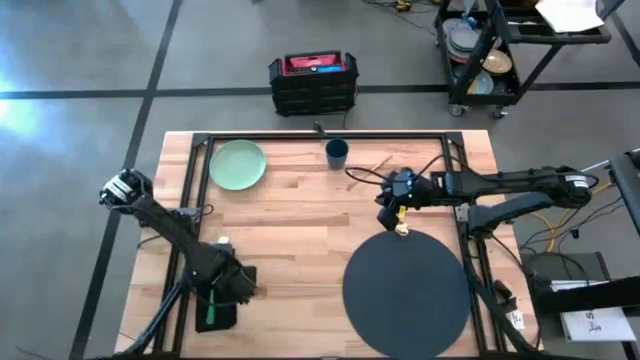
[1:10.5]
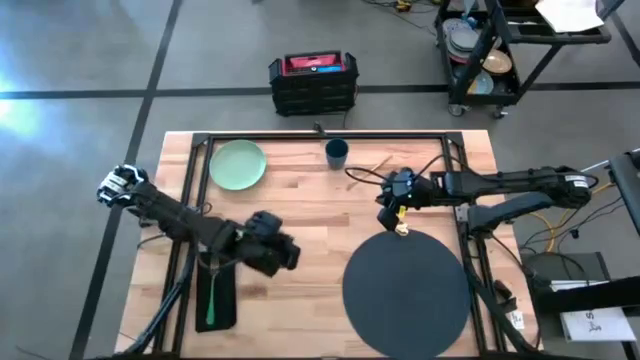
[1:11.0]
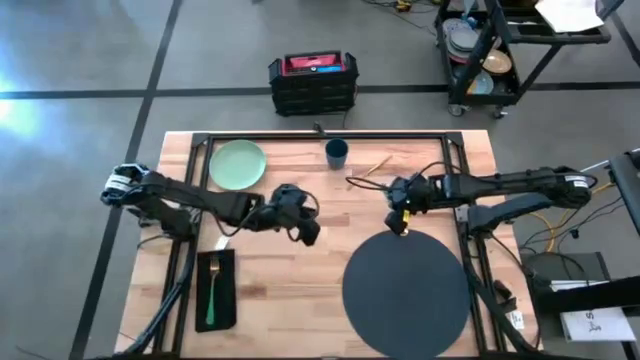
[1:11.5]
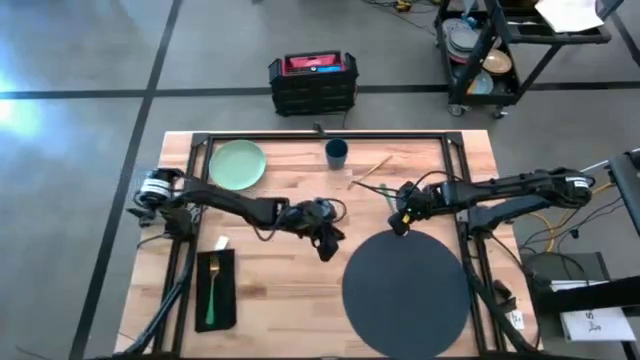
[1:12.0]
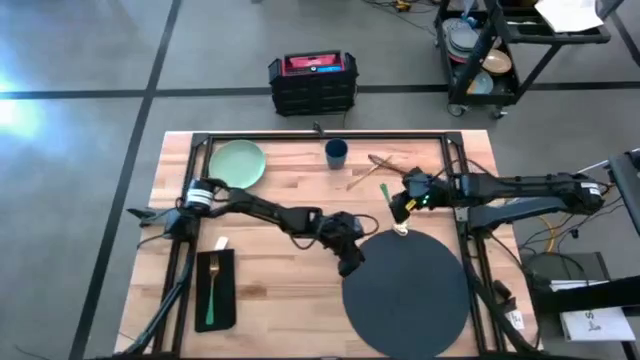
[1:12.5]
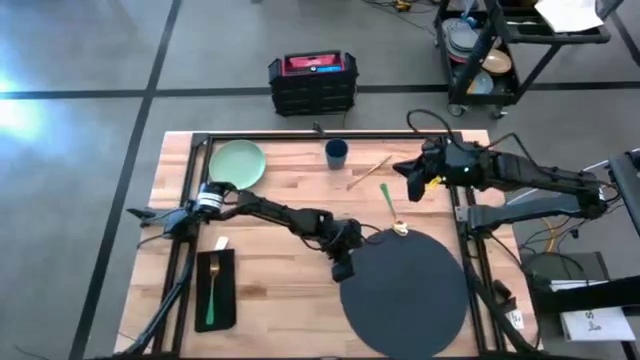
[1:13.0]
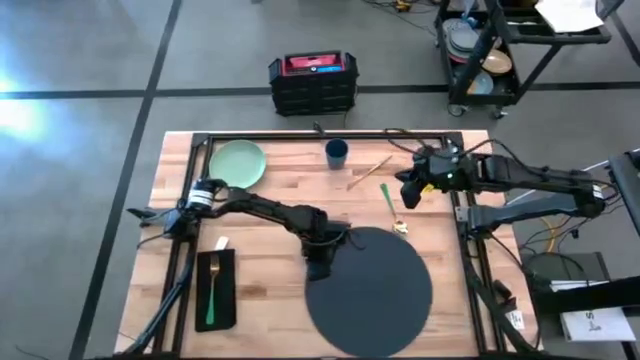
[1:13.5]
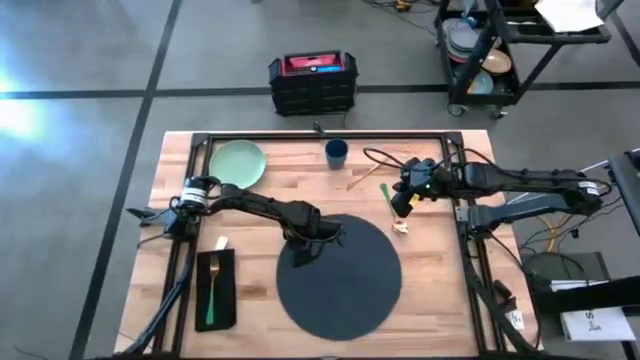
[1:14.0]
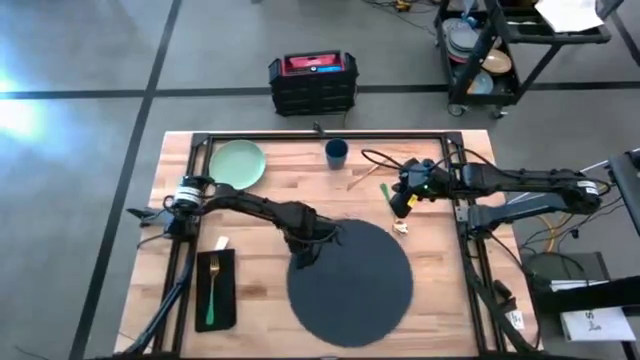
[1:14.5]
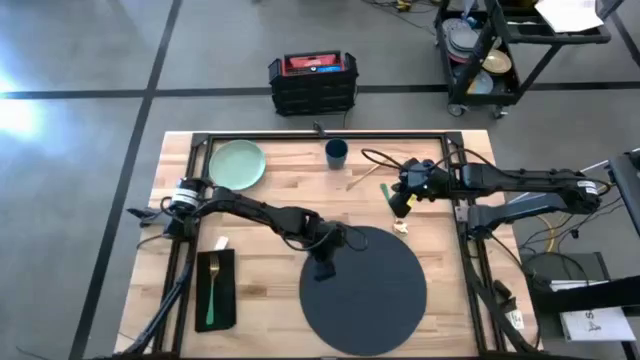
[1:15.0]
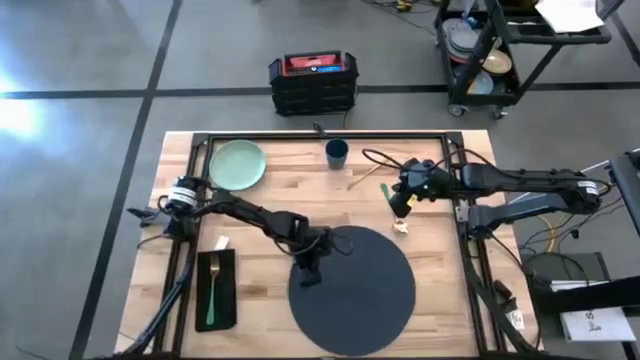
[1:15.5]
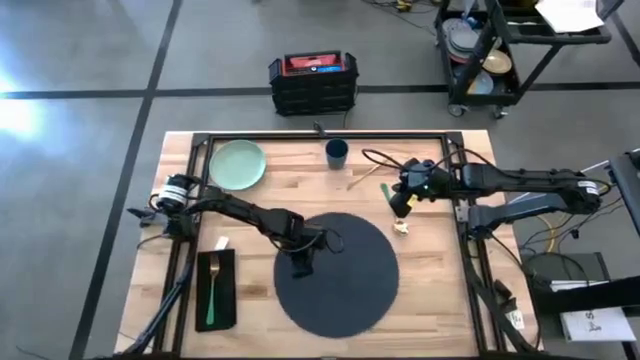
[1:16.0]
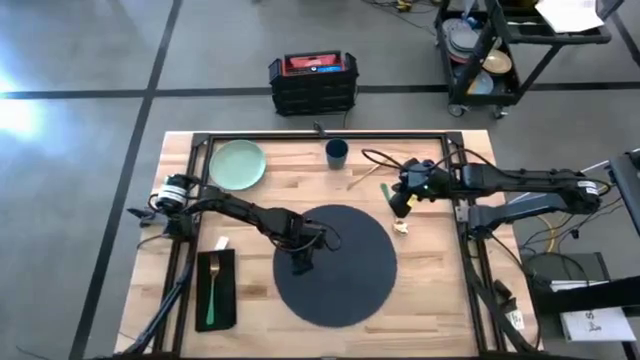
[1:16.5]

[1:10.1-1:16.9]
Task: Set table place
Move the black placemat to the center of the table

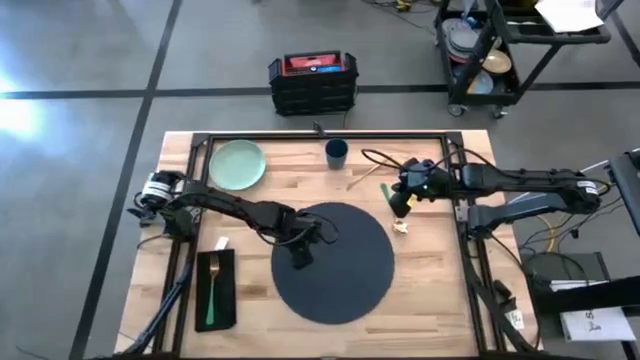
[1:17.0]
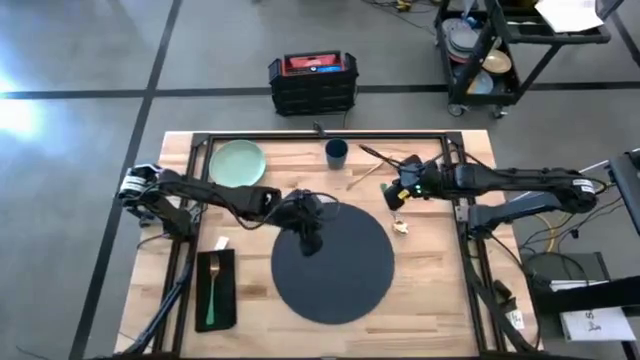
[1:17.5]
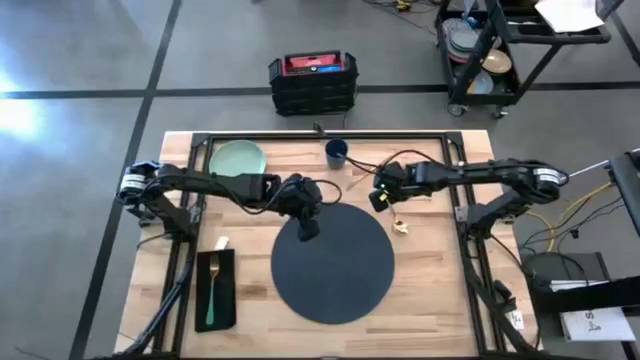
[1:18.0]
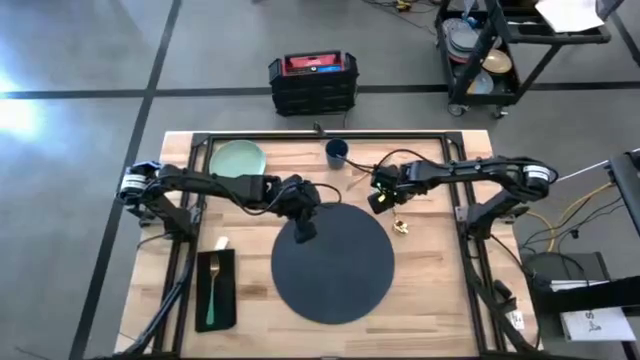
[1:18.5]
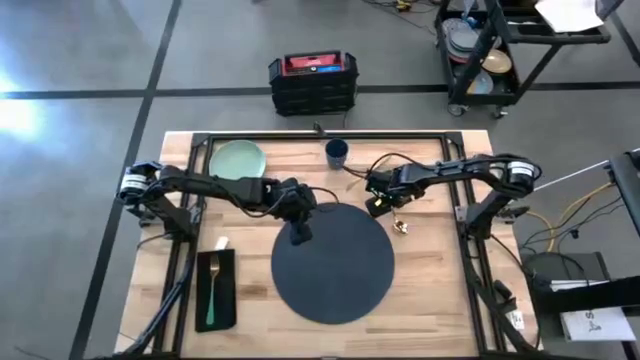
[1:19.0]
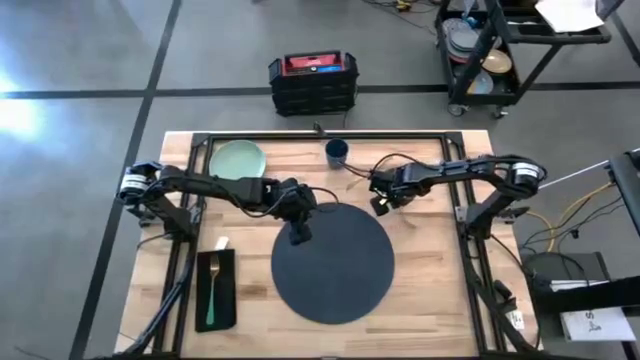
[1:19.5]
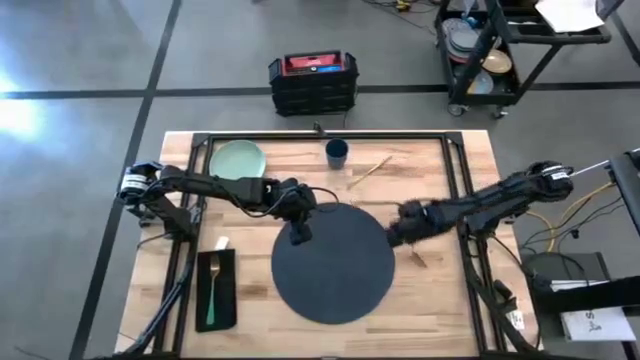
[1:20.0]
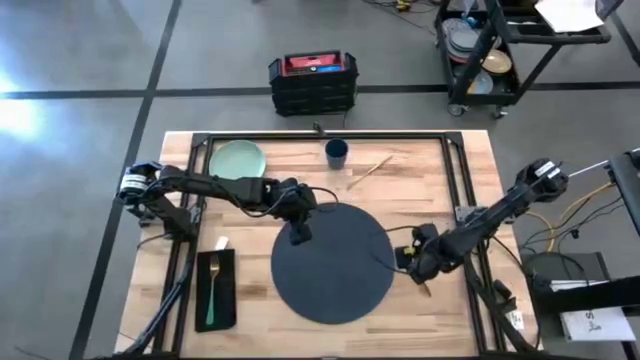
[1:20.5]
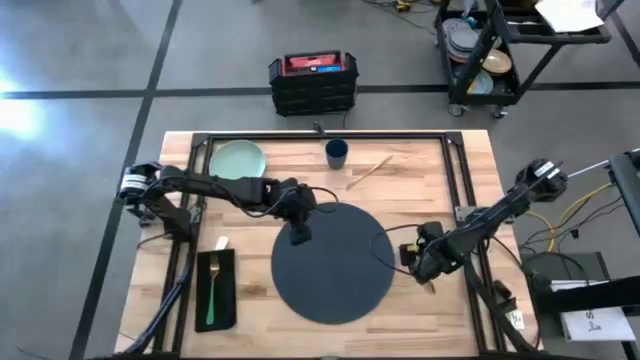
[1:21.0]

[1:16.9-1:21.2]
Put the gold knife on the black table mat

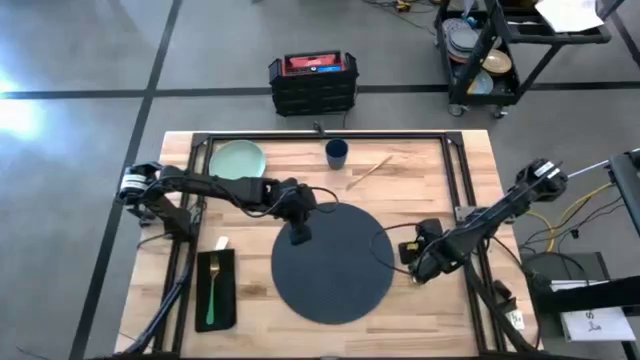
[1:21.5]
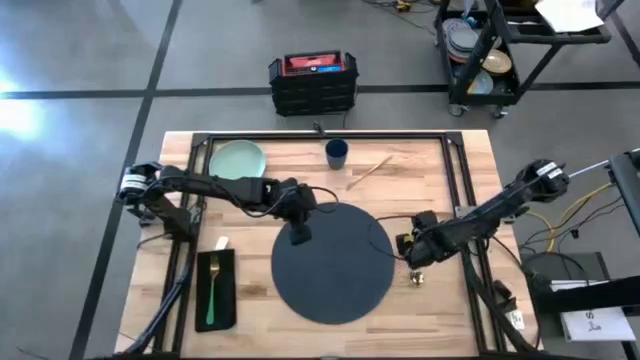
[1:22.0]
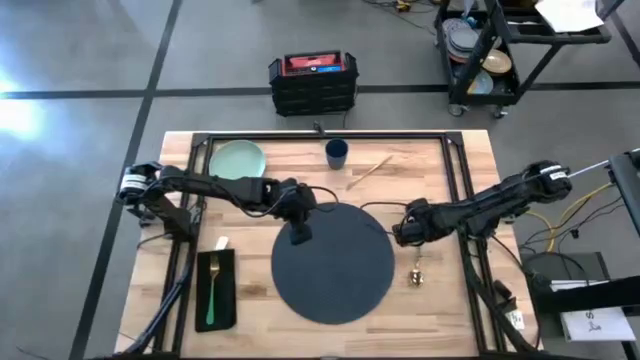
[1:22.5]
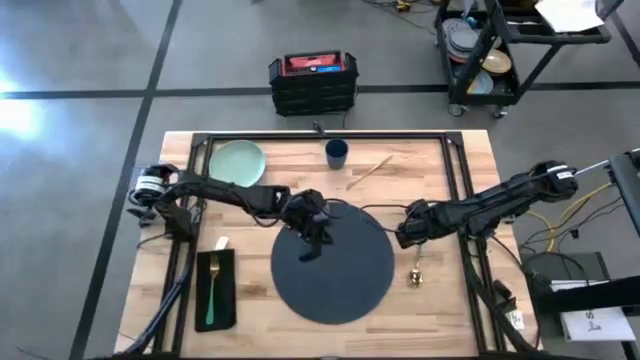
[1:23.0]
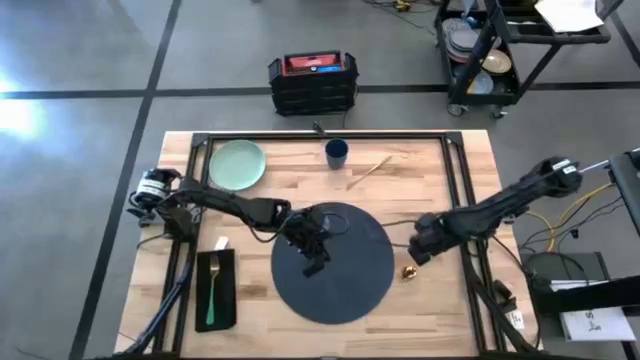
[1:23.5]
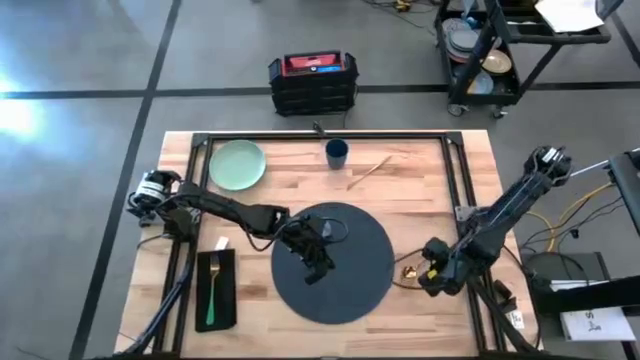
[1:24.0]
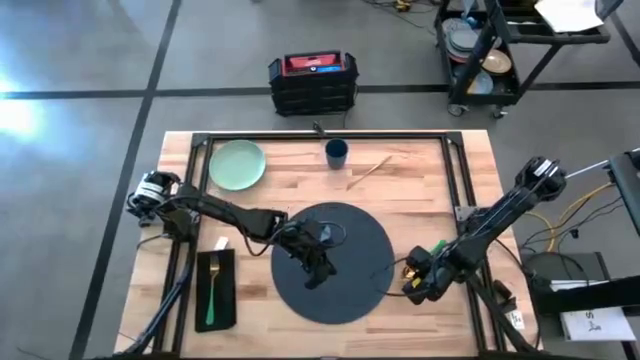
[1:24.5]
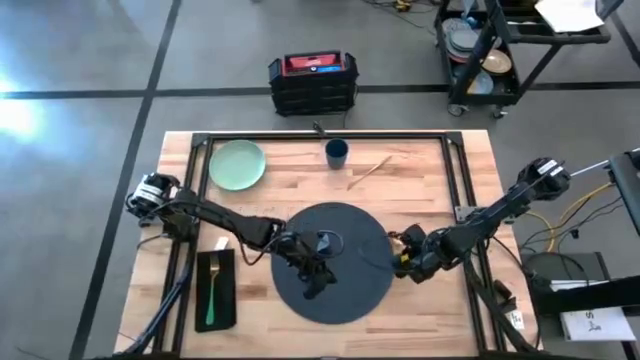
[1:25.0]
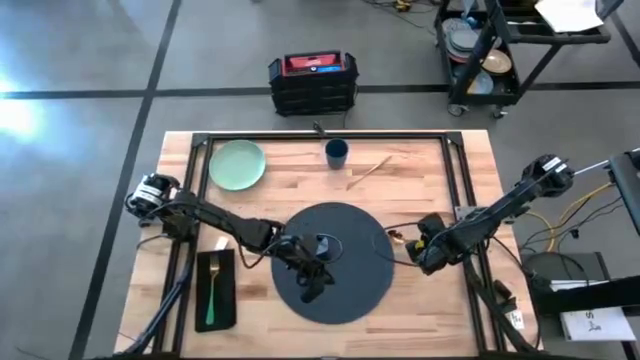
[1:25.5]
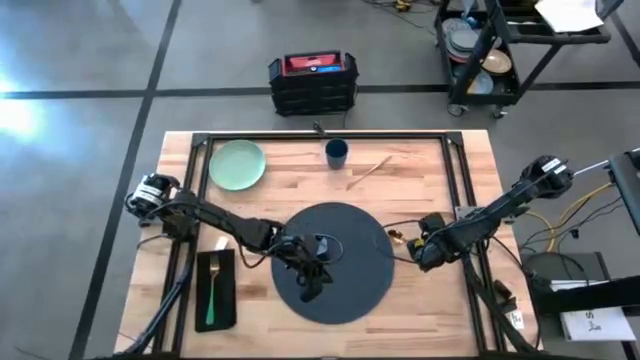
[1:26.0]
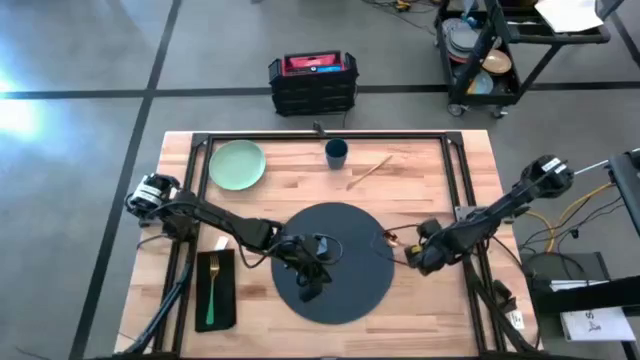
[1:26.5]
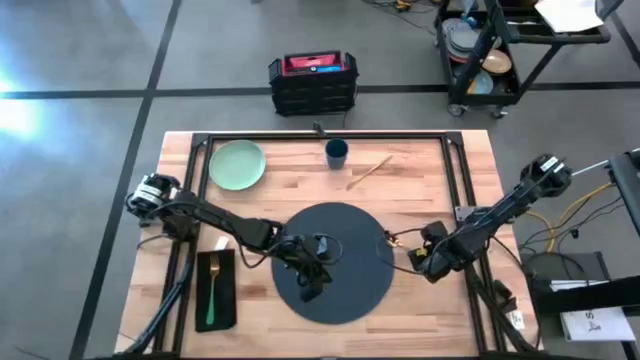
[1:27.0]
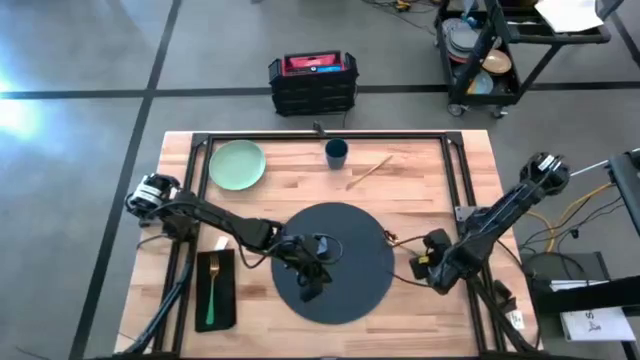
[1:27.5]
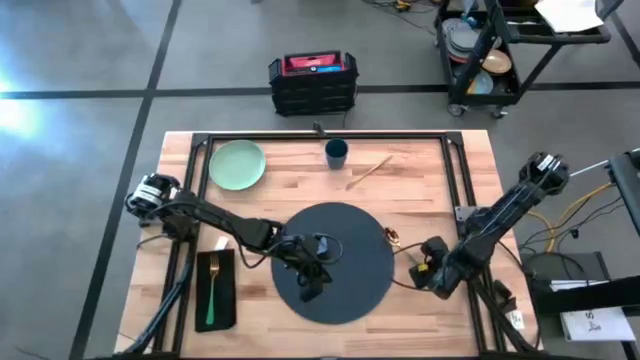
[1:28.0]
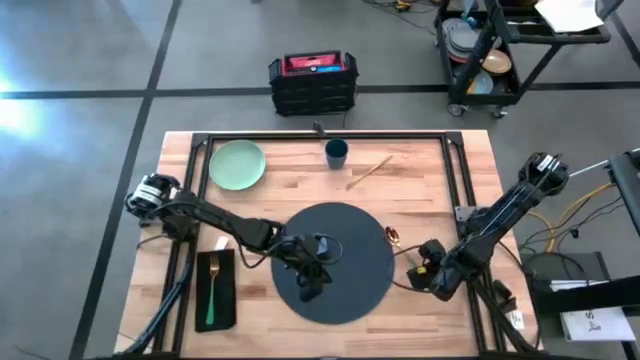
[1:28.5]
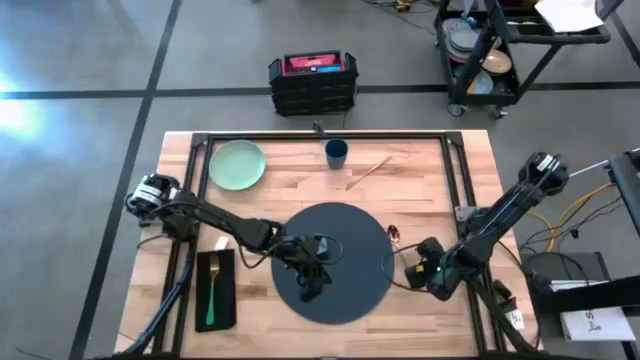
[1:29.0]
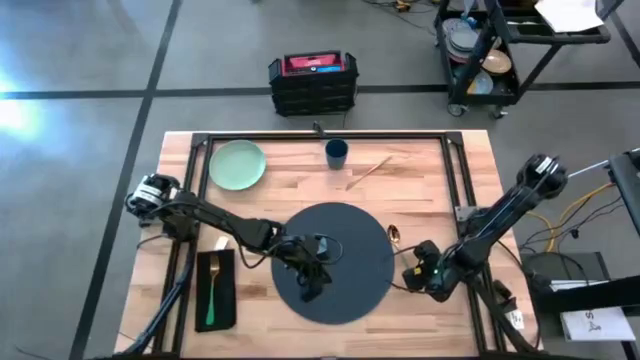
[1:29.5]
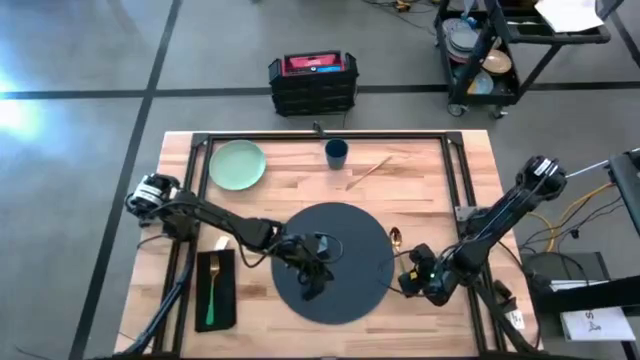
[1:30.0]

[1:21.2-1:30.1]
Adjust the green spoon
